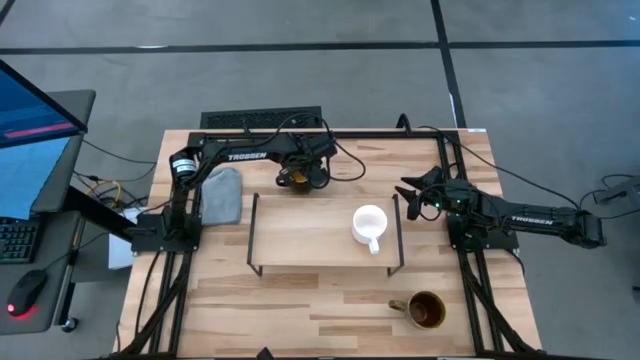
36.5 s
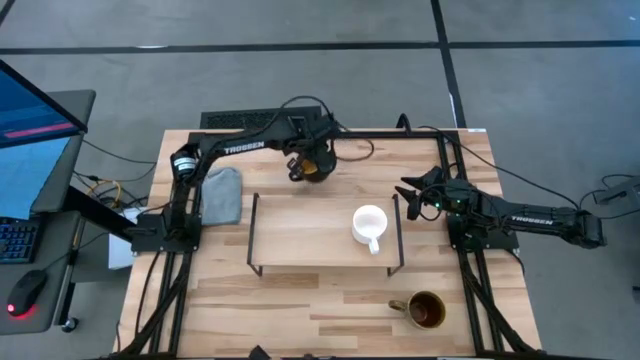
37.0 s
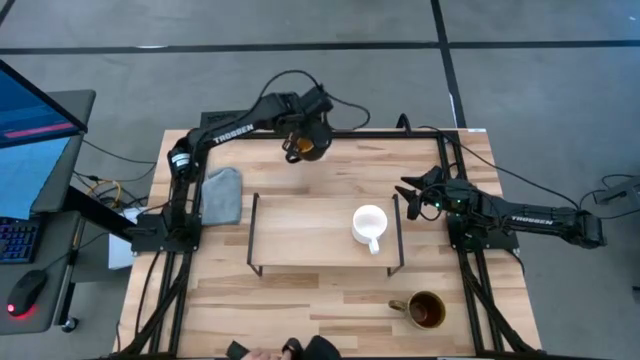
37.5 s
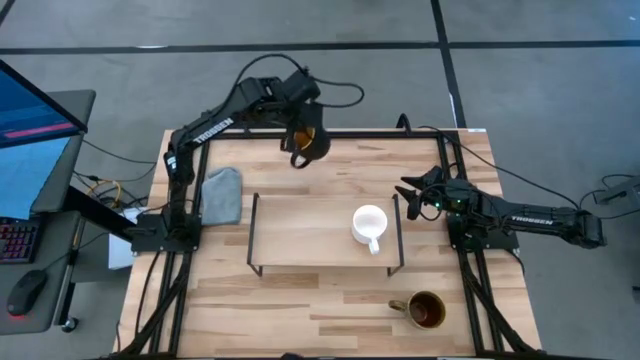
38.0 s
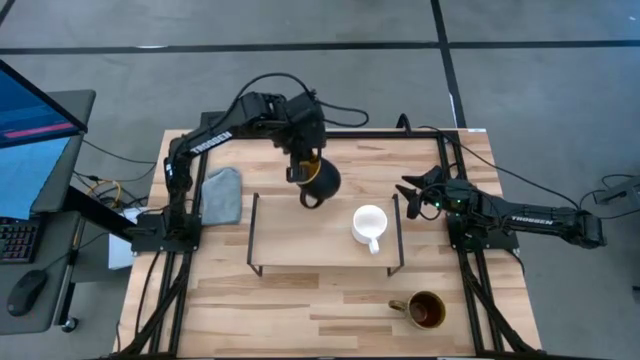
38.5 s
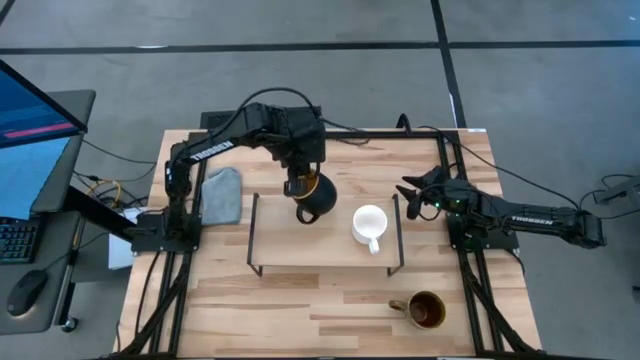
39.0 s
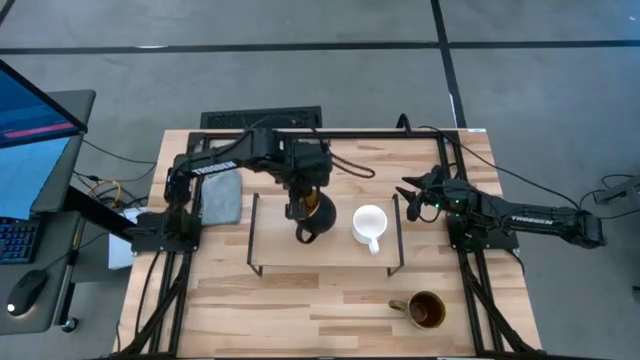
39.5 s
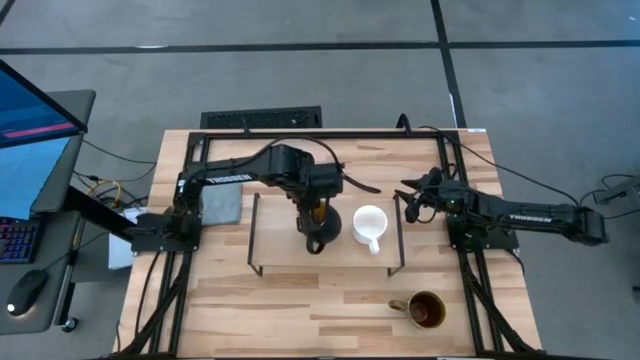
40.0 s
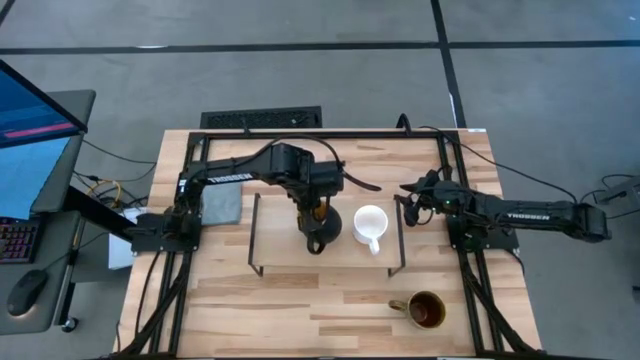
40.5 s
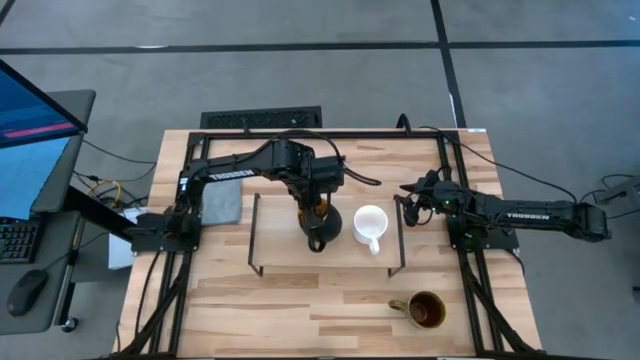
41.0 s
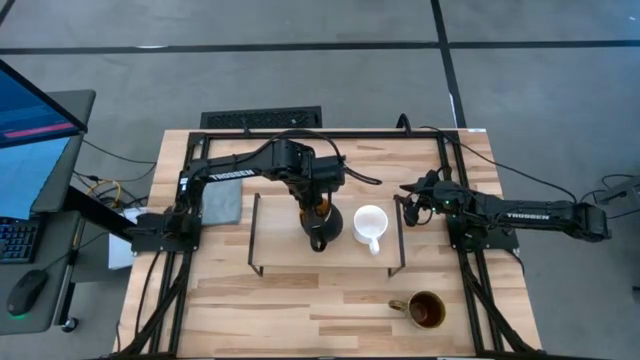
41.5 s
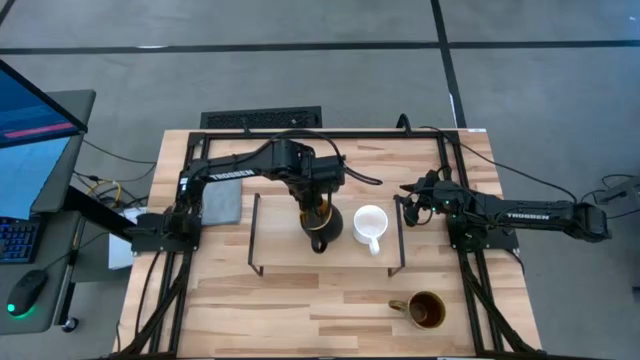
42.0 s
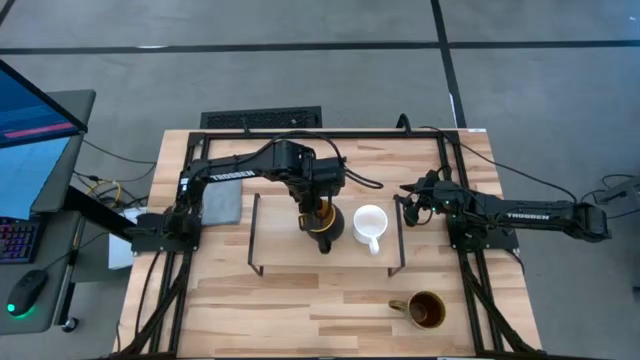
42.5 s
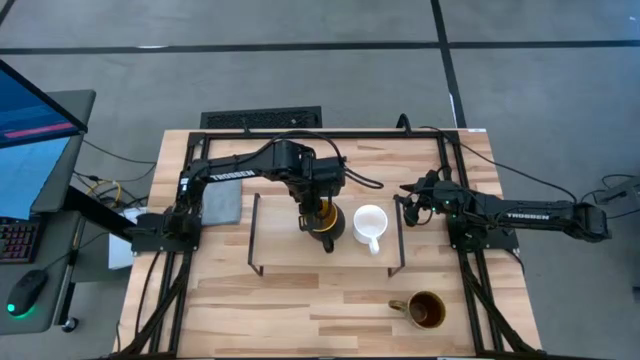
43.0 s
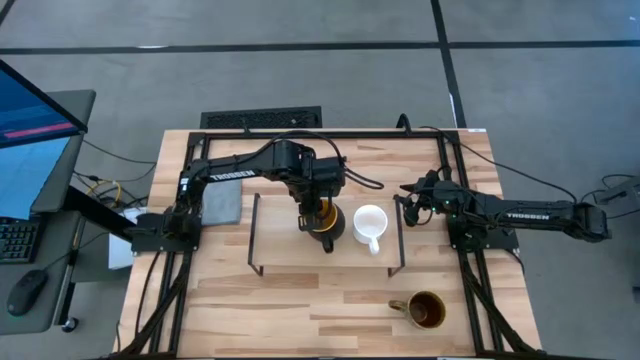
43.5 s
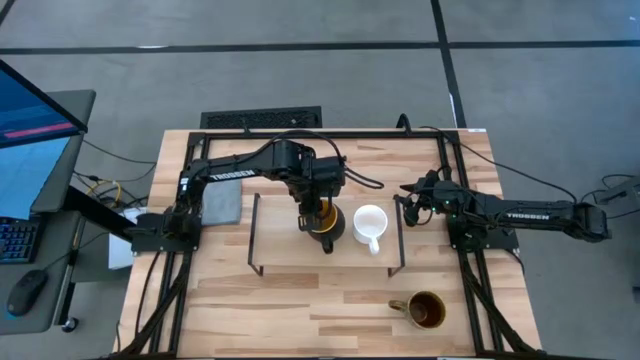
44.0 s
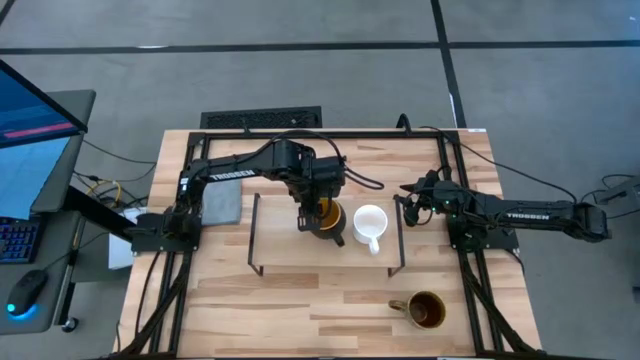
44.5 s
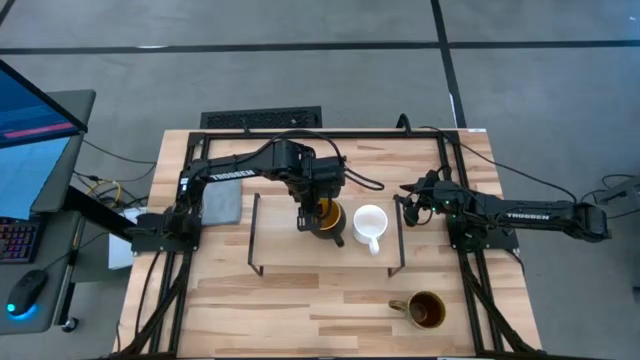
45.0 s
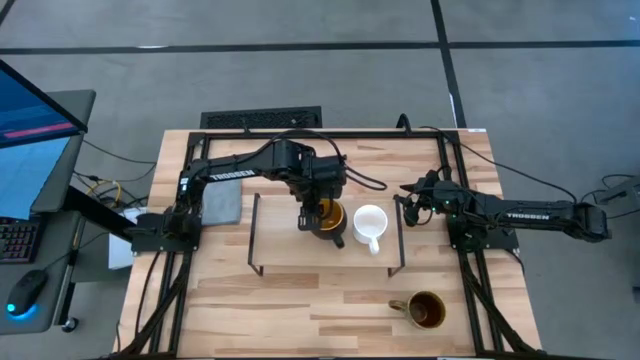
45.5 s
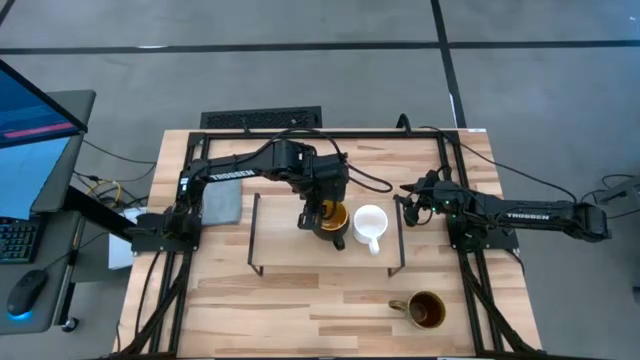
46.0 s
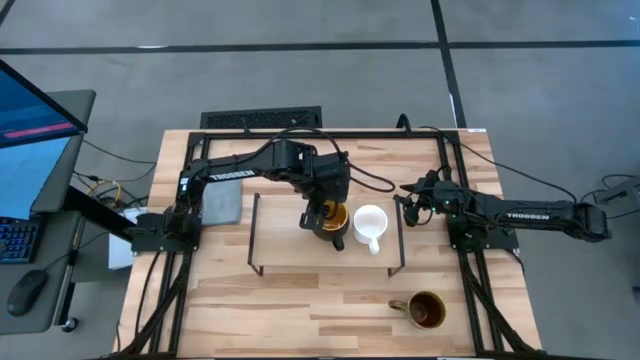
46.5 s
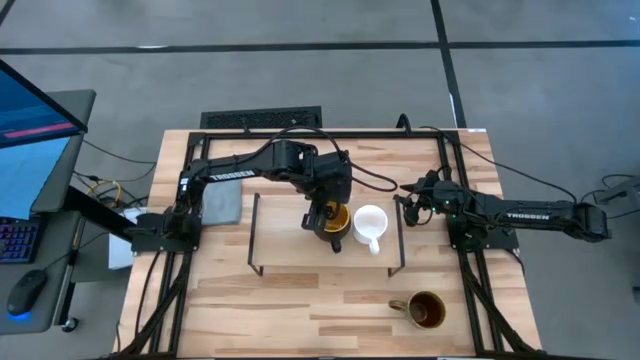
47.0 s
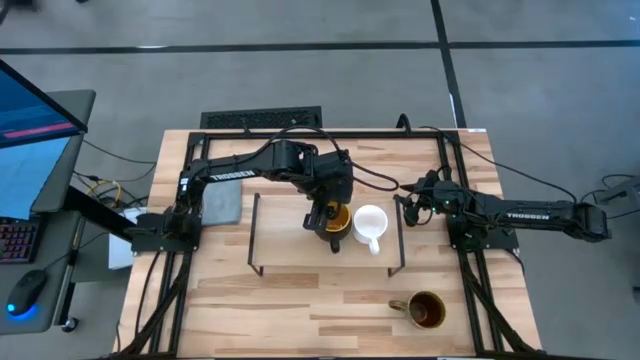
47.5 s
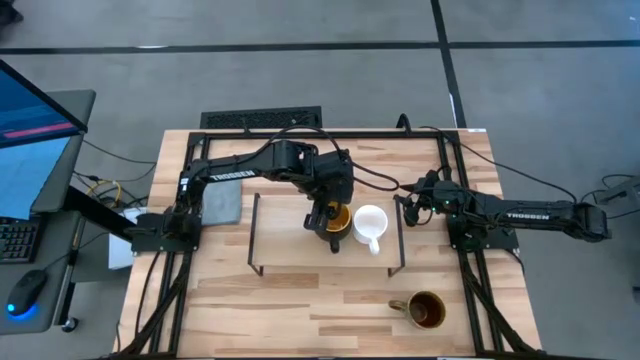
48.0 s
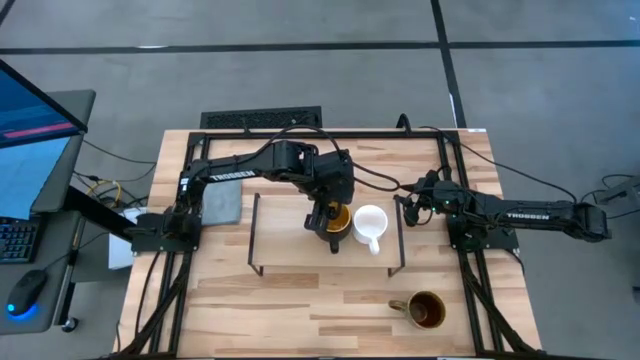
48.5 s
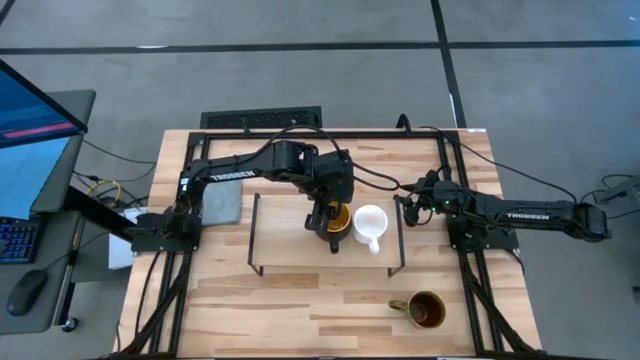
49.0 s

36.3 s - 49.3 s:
Task: Stack small to large cups/mugs on shelf
Put the black mug on the shelf
